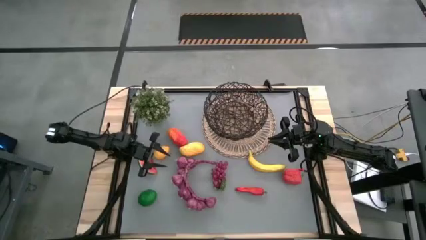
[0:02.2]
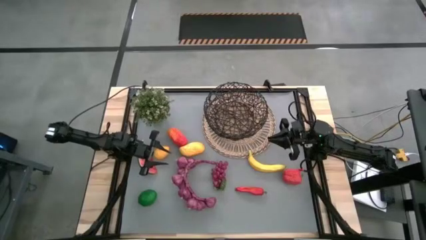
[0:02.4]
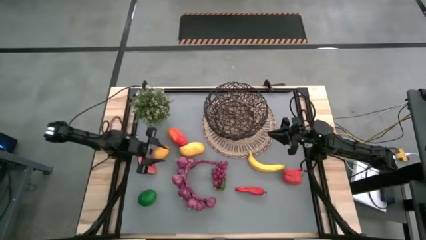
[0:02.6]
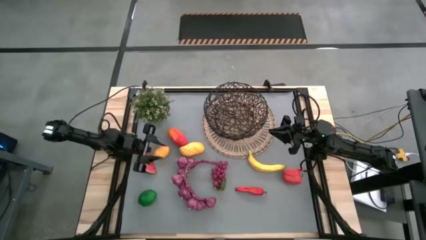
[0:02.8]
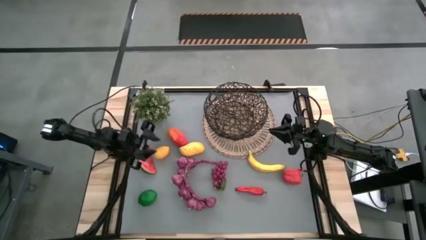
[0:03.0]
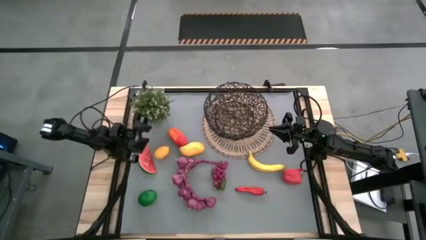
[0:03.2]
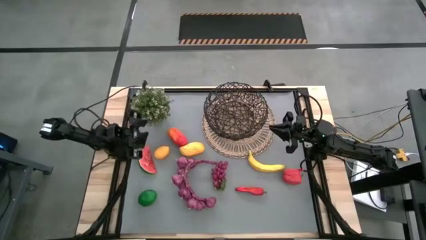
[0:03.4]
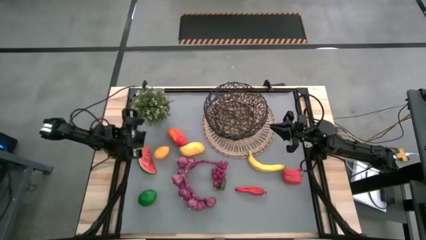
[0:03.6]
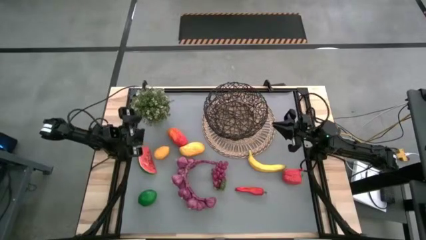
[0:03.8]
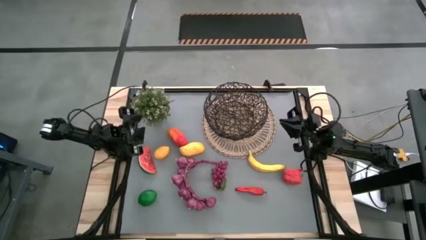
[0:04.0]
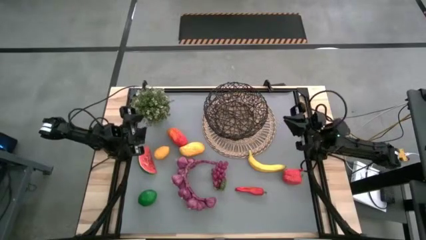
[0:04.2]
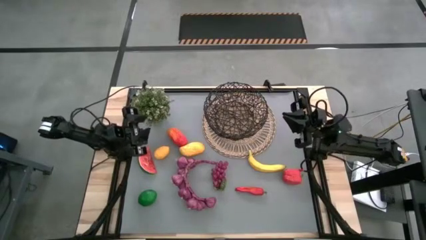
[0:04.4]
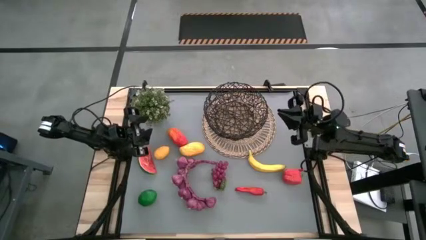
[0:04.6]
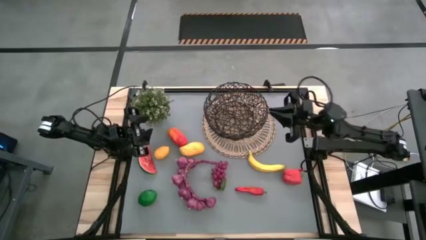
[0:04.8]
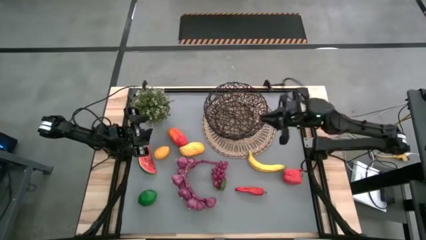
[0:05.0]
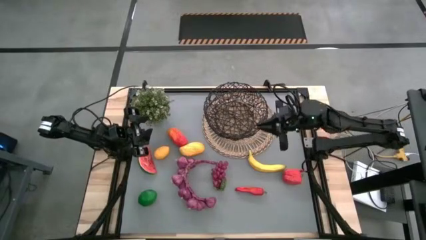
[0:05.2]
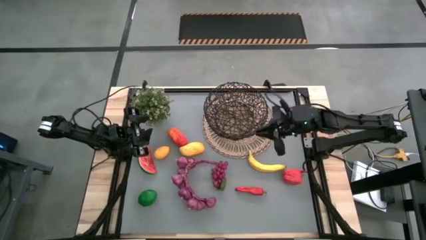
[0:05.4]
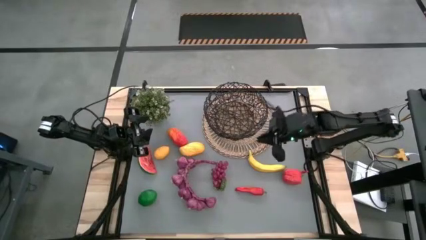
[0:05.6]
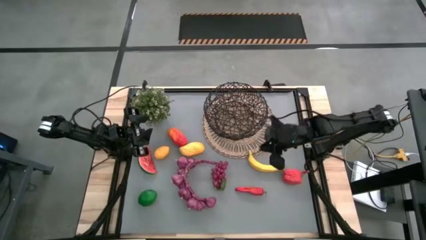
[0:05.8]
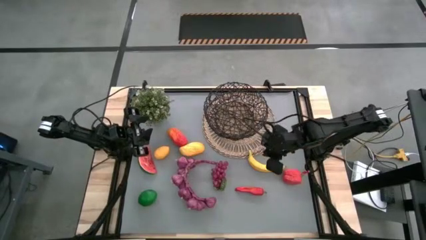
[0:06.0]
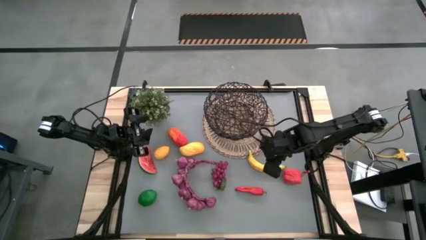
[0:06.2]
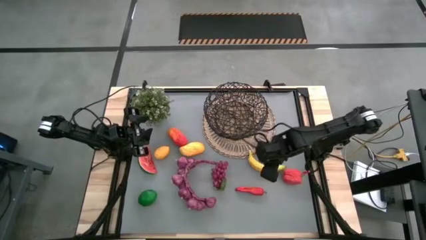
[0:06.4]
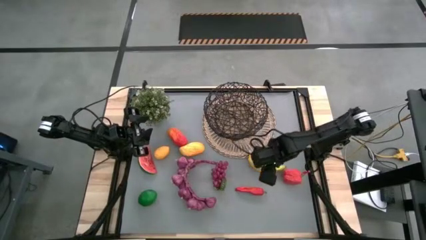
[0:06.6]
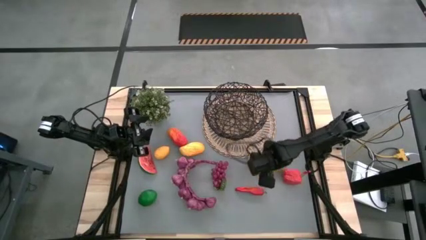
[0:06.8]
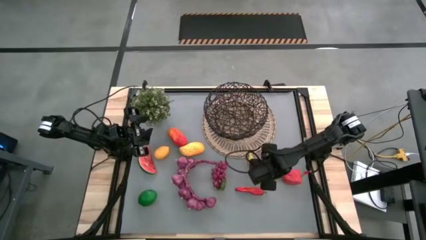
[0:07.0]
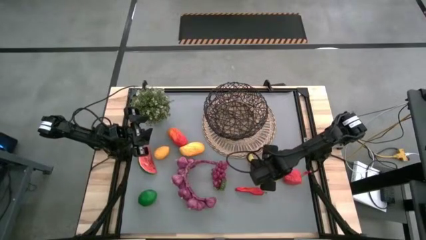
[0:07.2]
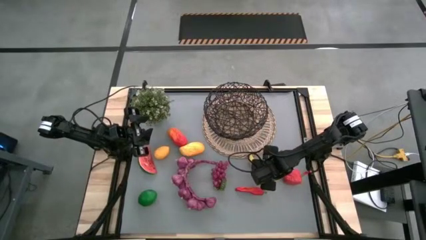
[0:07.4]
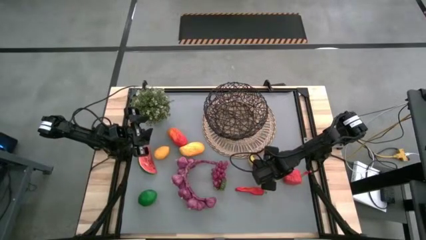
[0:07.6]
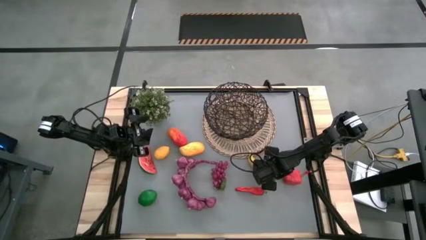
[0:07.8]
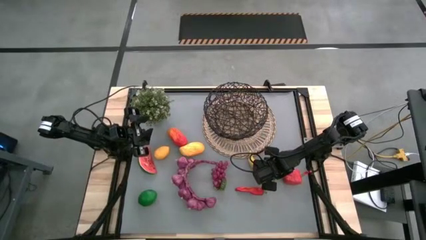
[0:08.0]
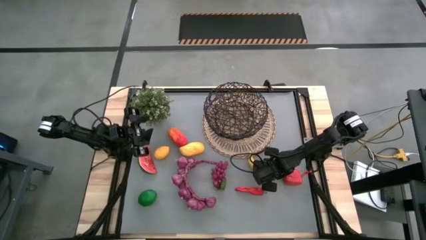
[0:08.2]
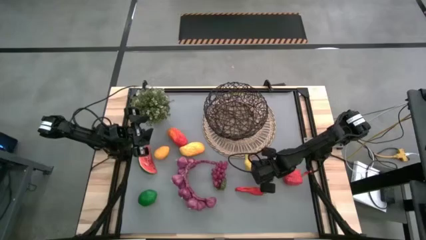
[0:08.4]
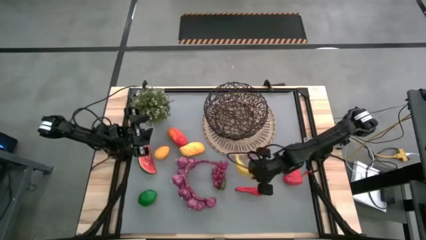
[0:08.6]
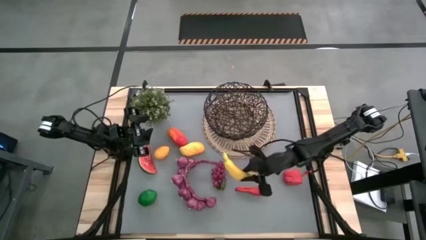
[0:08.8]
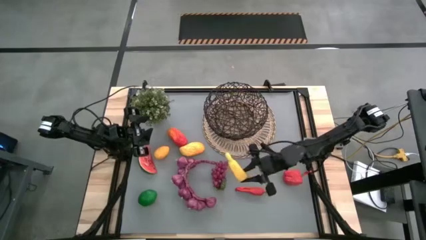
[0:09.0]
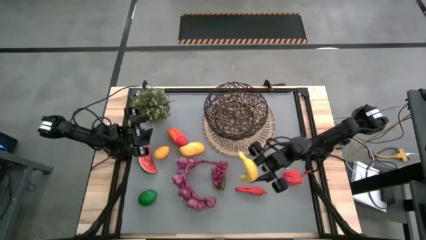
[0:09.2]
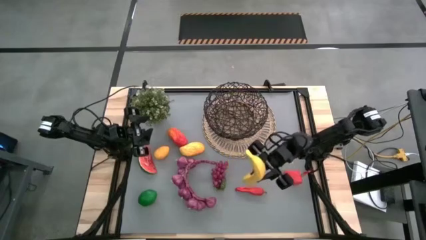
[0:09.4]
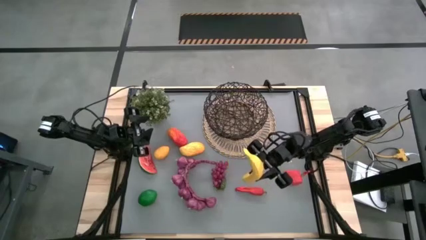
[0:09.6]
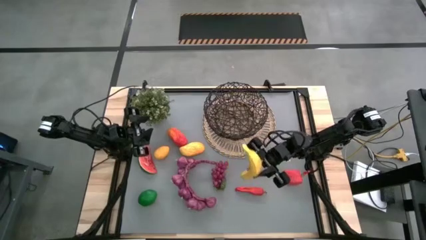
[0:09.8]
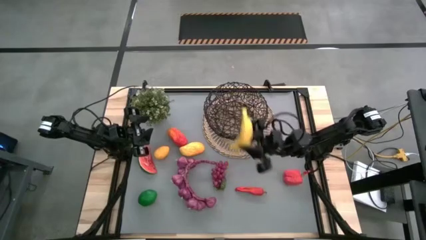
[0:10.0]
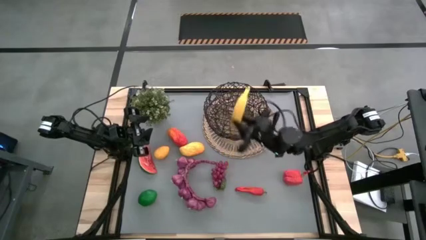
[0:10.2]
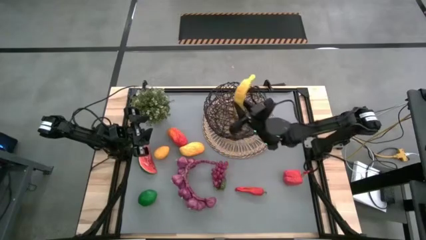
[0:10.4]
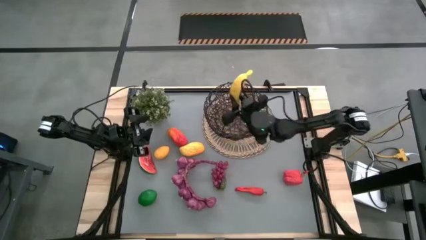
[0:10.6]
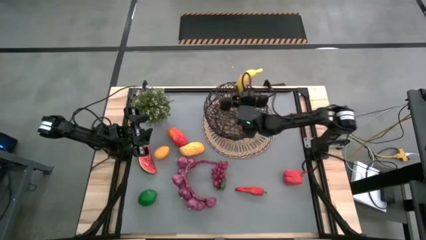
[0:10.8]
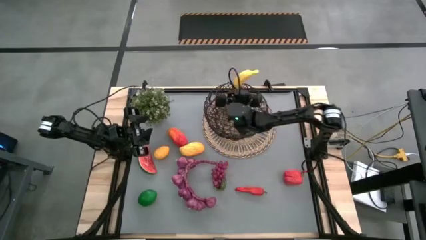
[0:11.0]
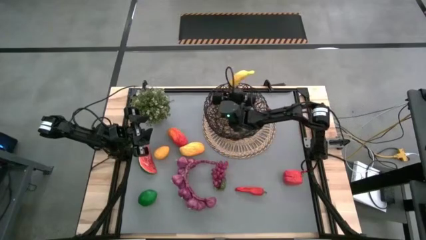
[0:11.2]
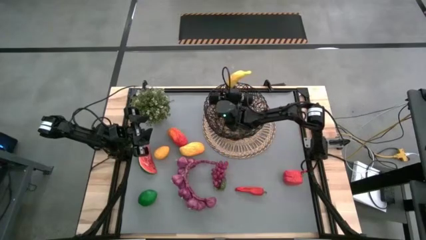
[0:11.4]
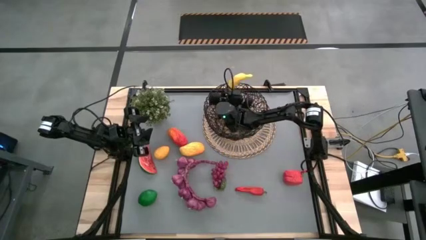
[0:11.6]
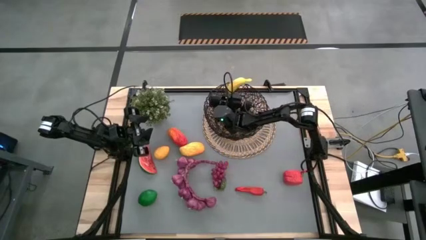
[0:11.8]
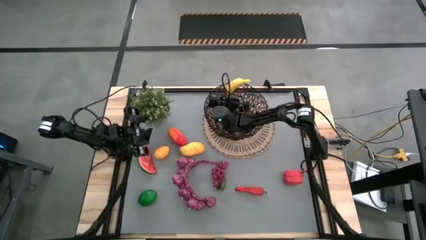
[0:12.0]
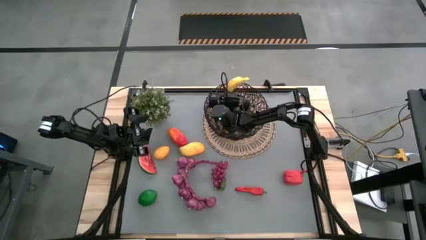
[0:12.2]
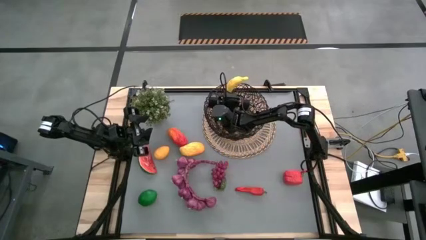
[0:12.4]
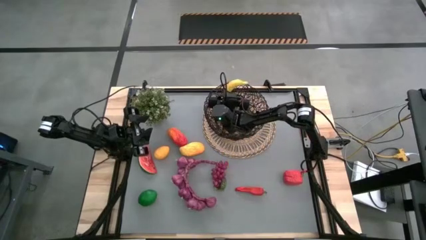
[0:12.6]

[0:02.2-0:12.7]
Task: Build produce basket
Put the banana into the black wire basket
